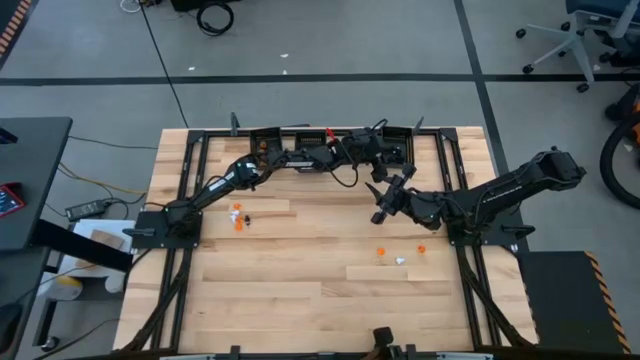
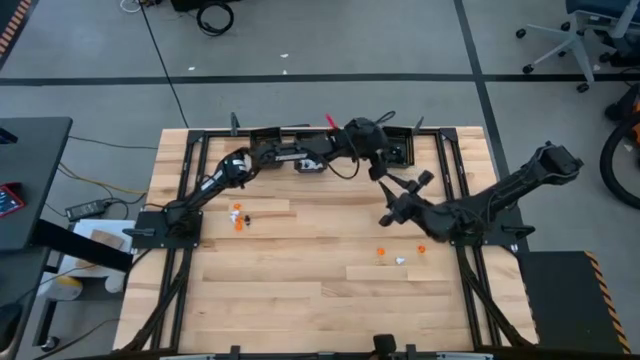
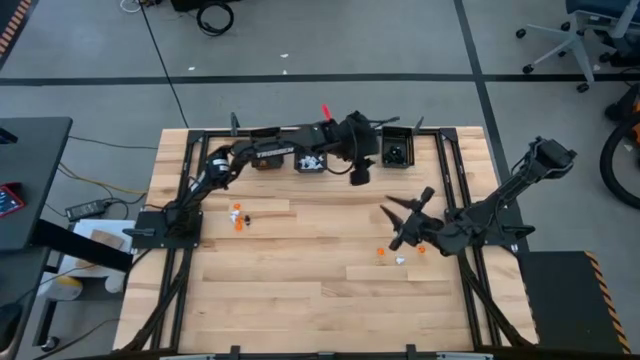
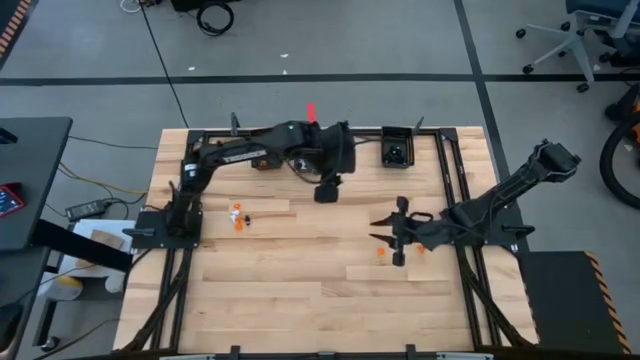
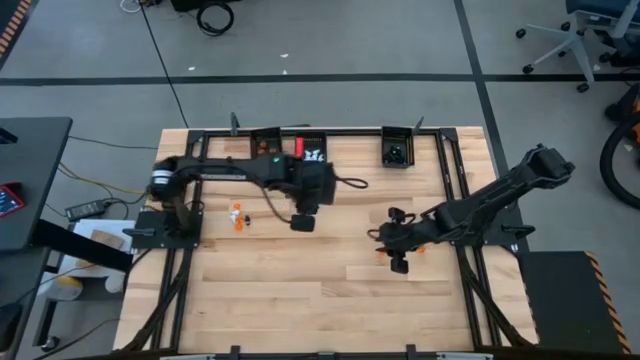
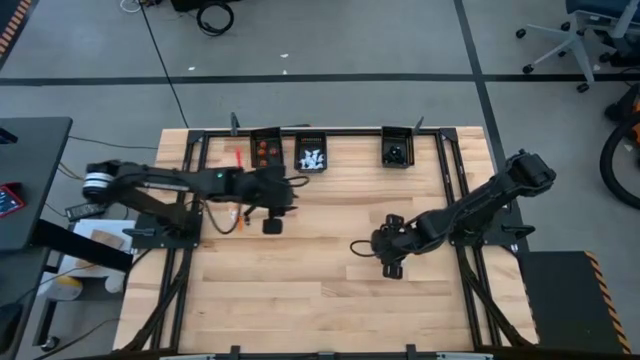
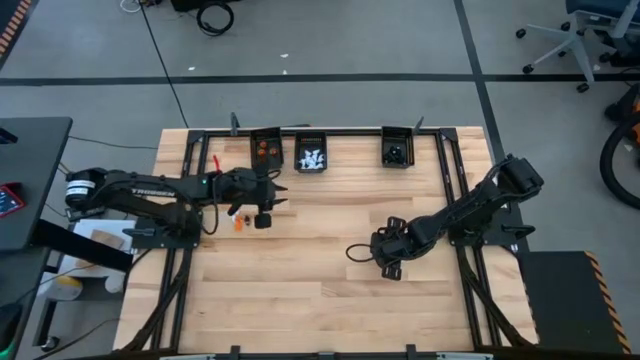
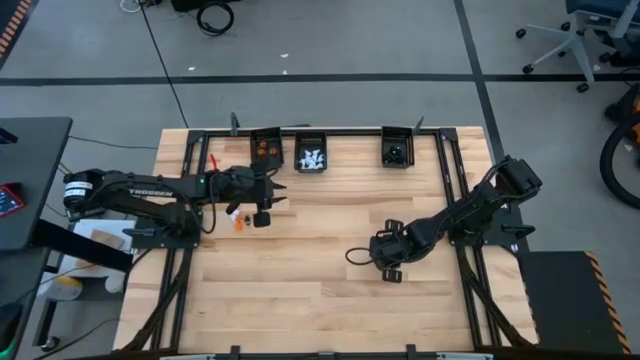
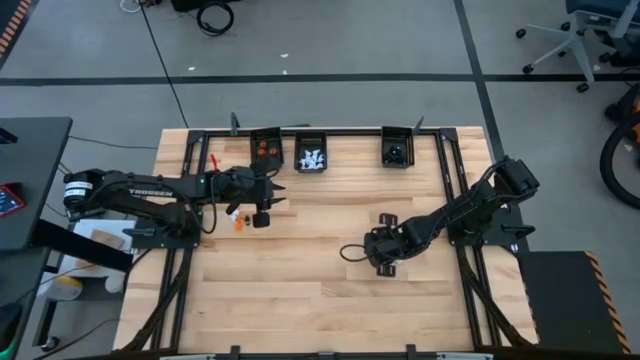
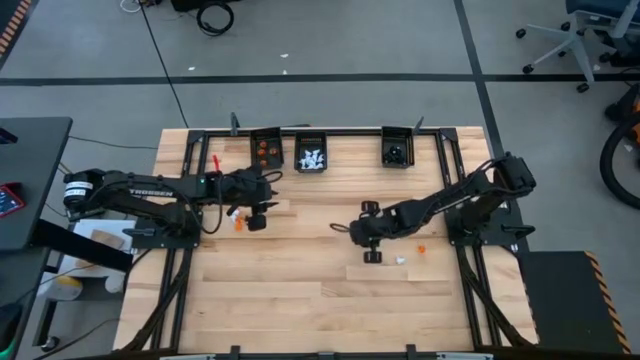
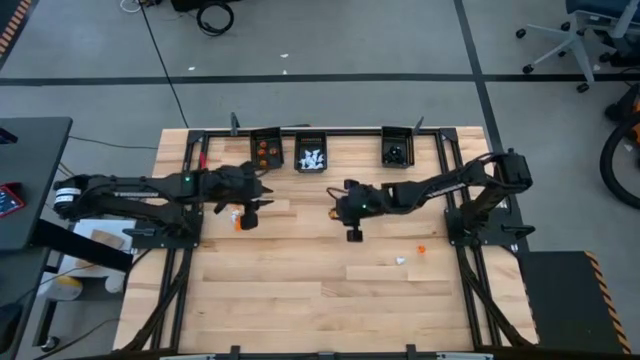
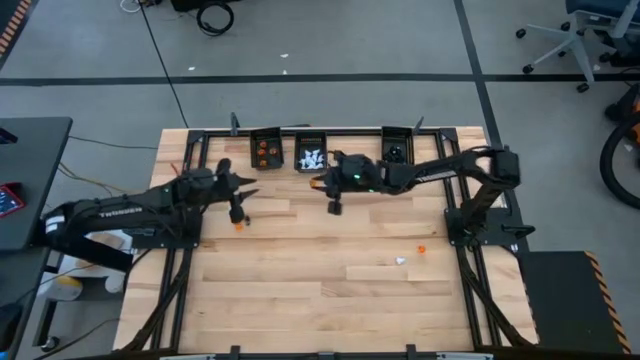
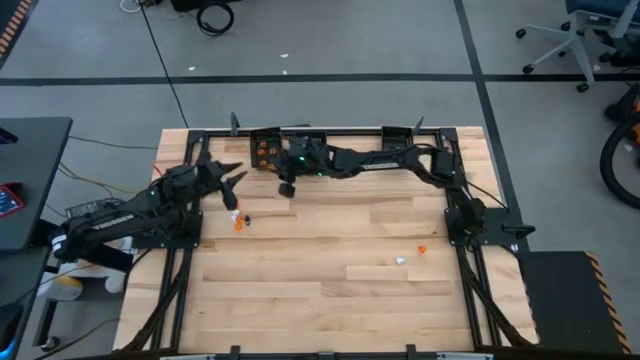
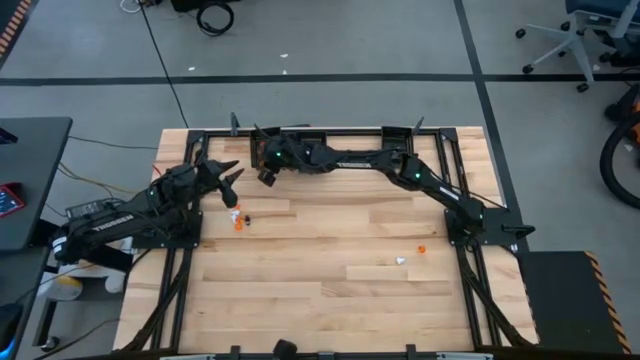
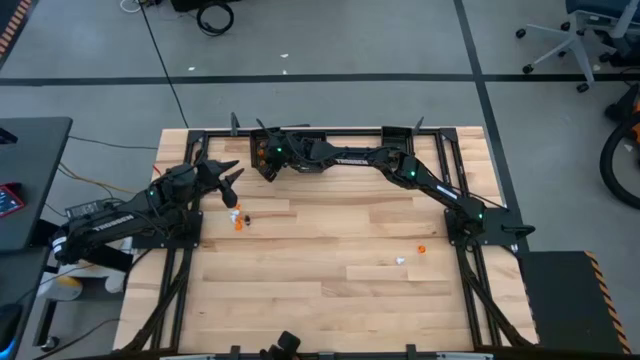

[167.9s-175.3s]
Task: Sort Halloween decoration
Put the orange pumpkin toy into the left black bin

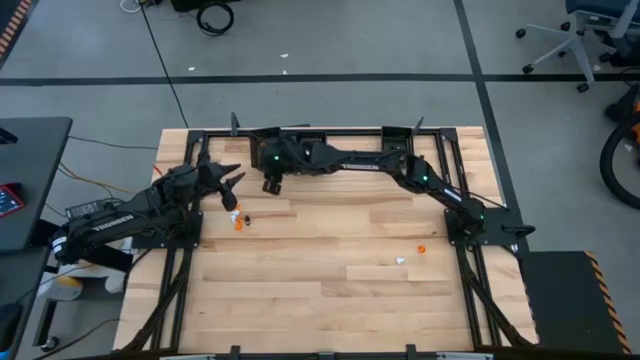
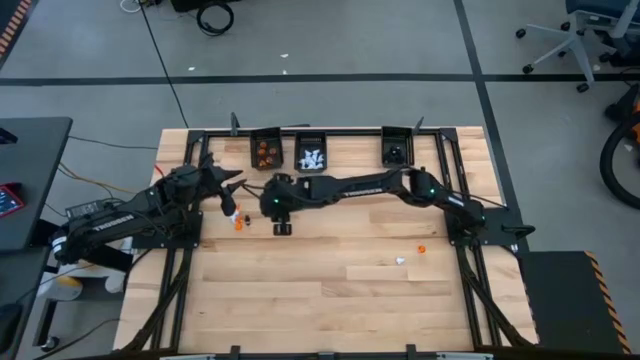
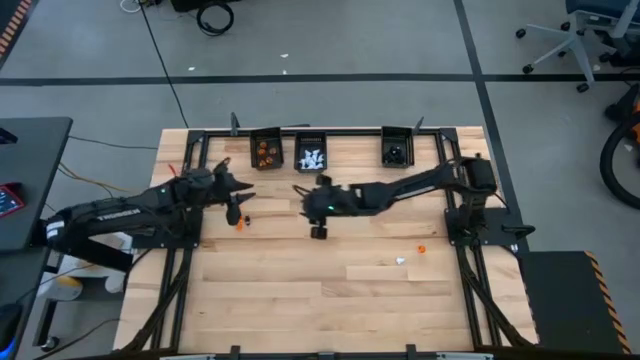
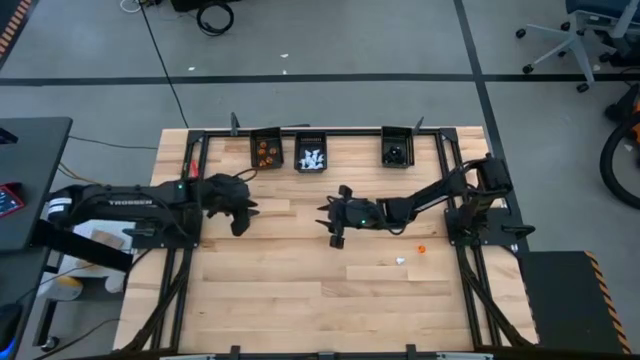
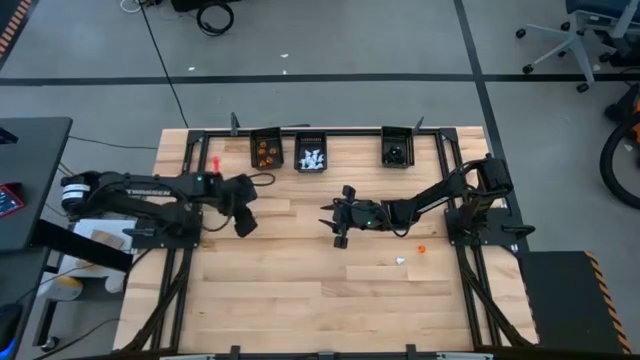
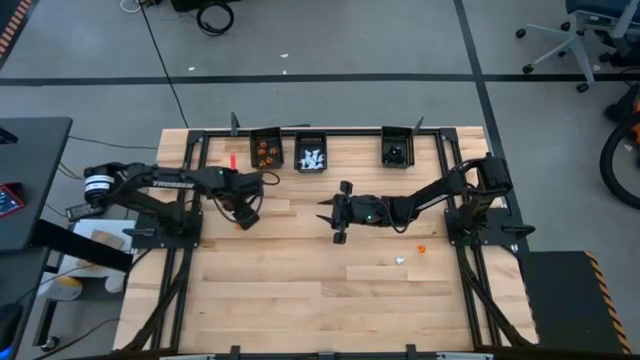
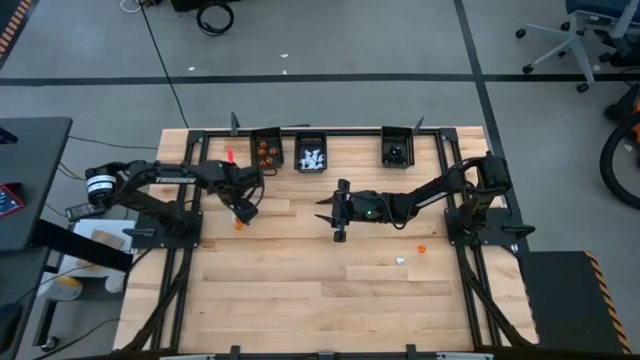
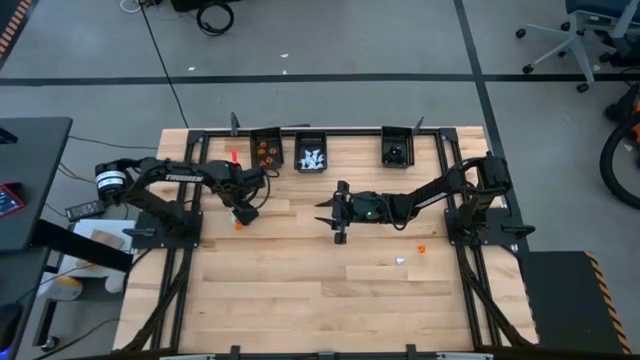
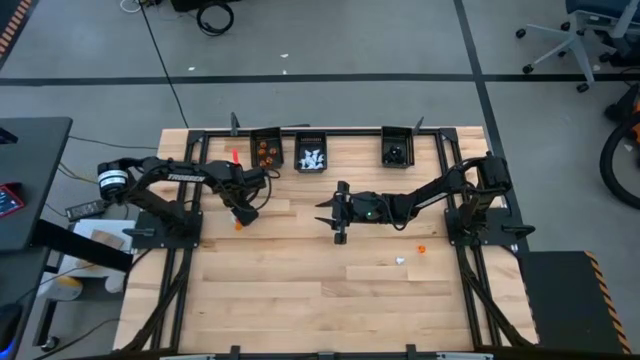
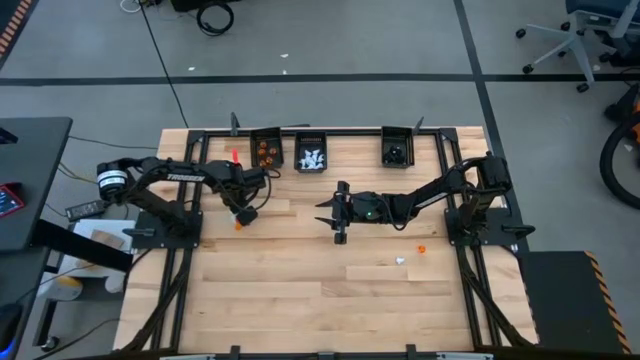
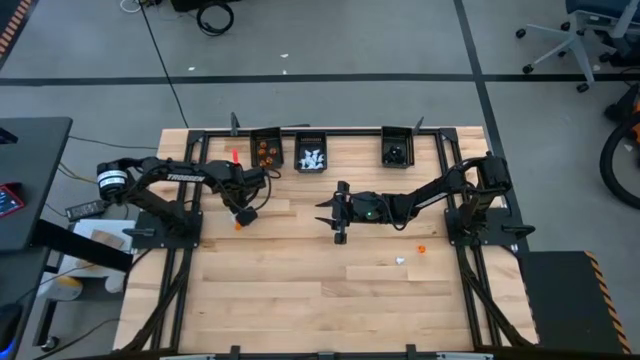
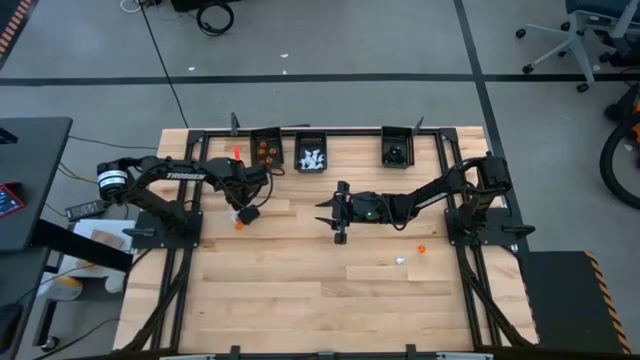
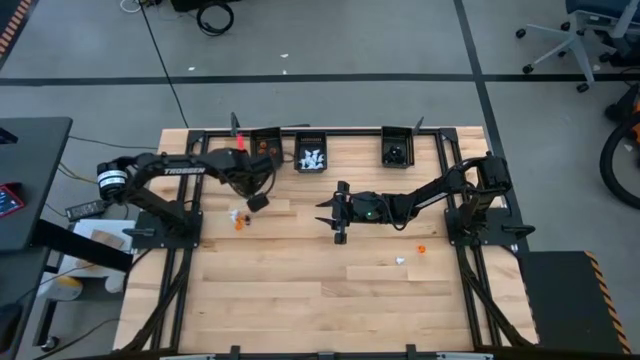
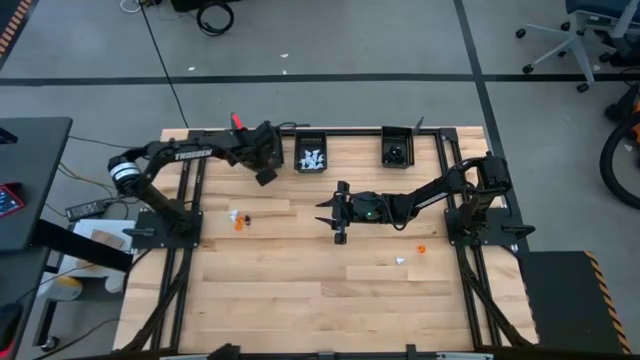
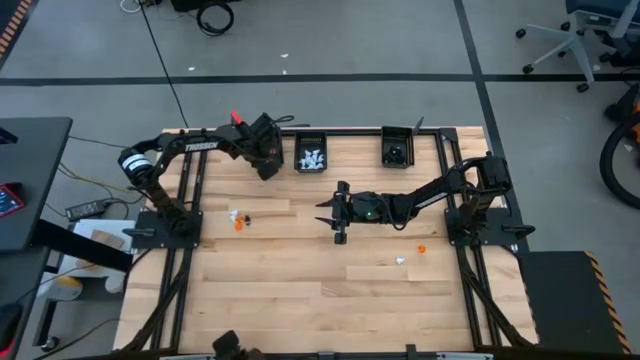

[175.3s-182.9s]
Put the orange pumpkin toy into the left black bin

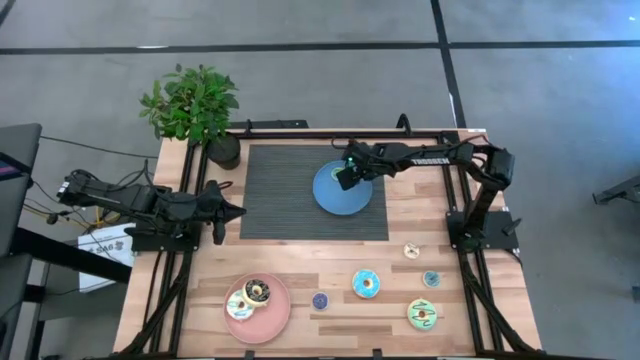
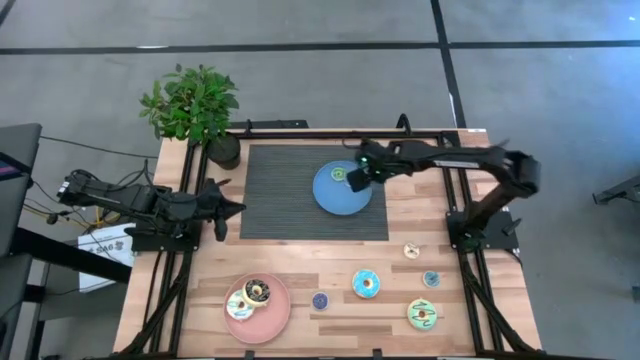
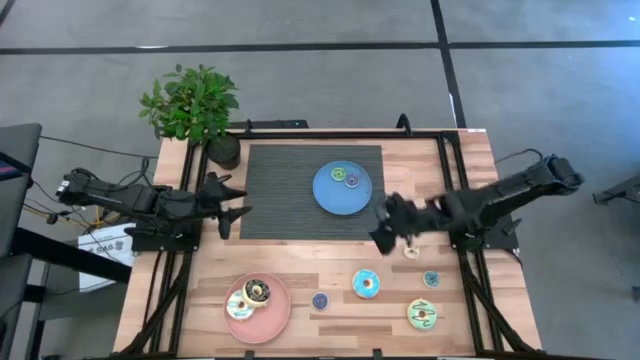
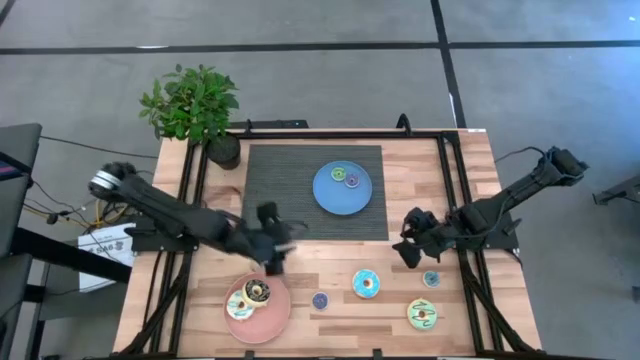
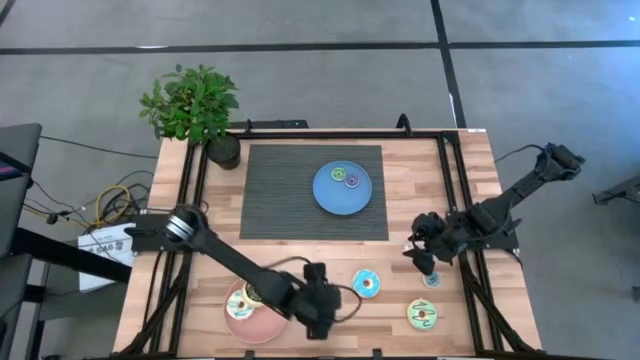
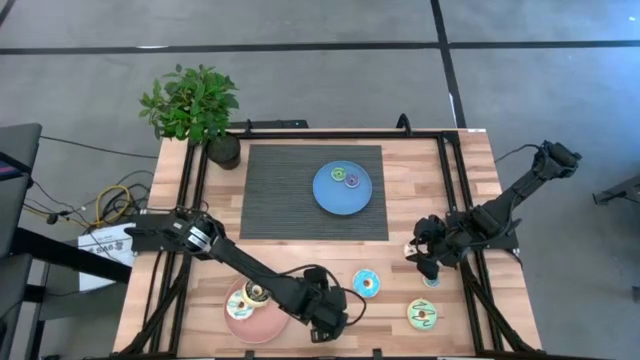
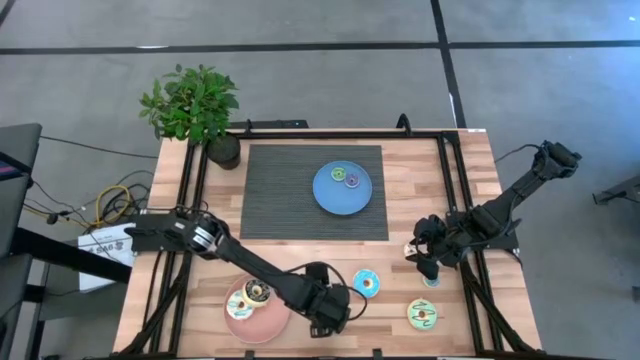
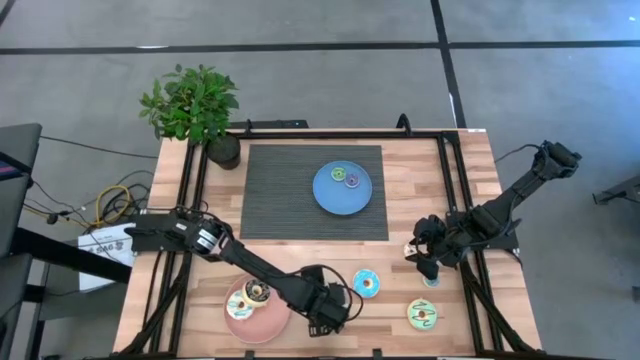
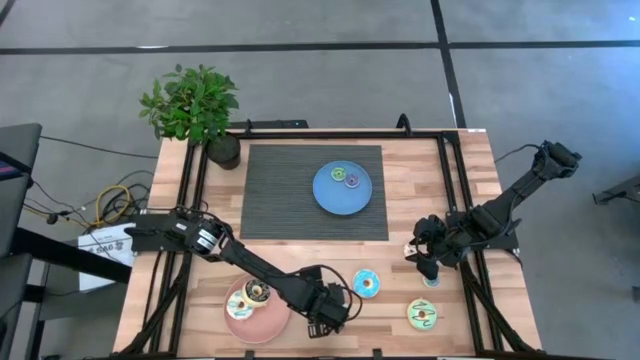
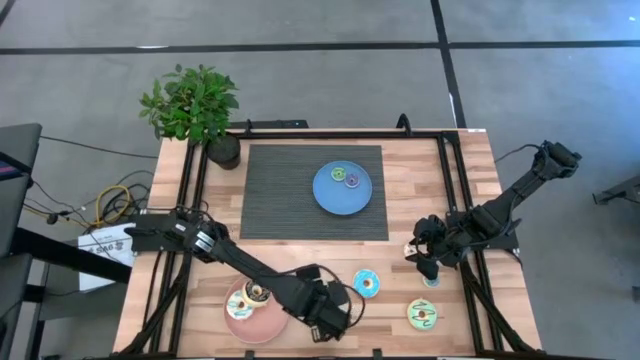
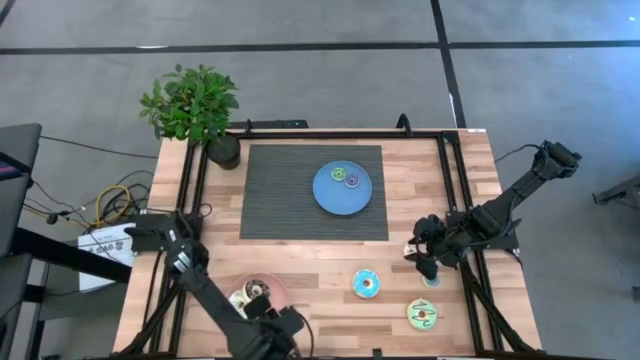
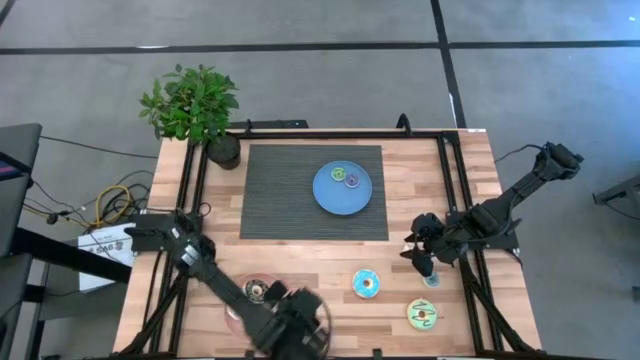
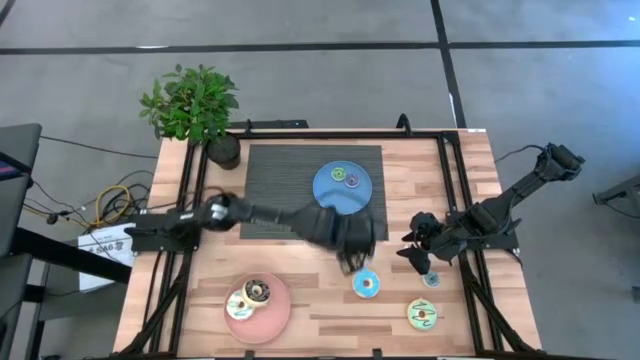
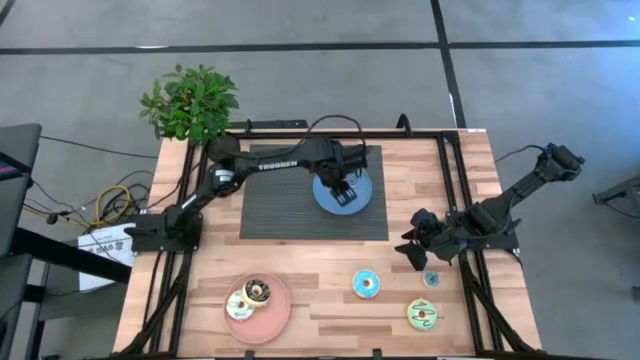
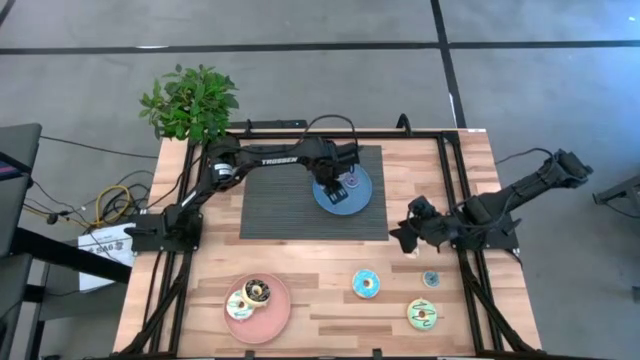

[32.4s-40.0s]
Task: Pick & Place donuts
Put the small purple donut on the blue plate
